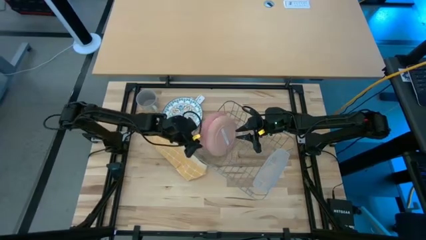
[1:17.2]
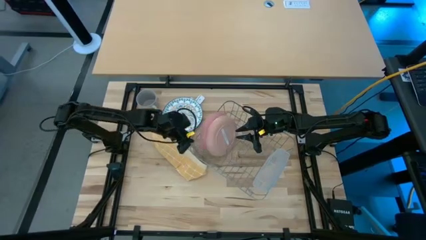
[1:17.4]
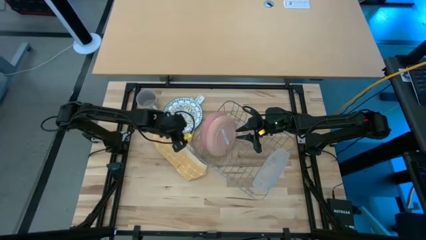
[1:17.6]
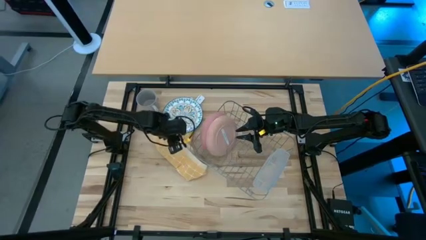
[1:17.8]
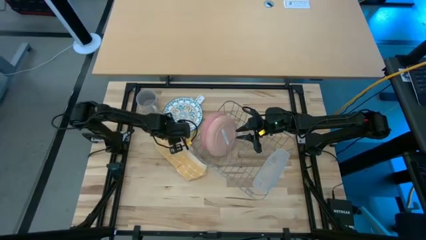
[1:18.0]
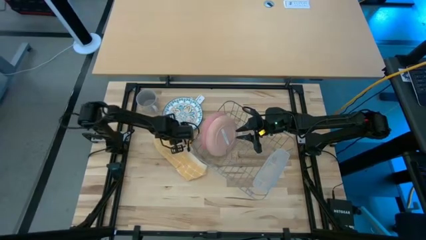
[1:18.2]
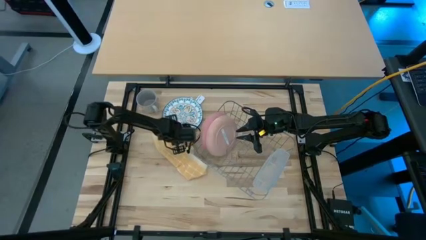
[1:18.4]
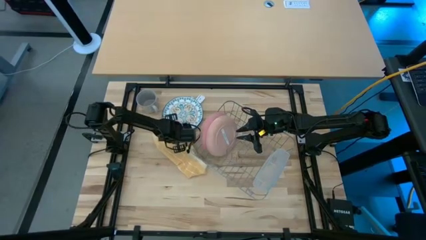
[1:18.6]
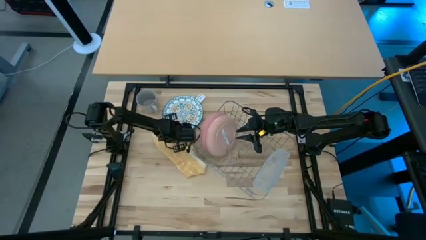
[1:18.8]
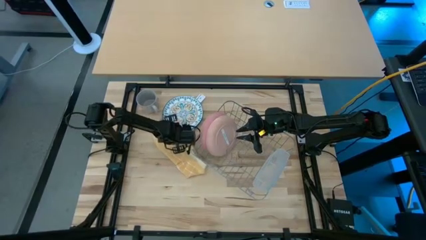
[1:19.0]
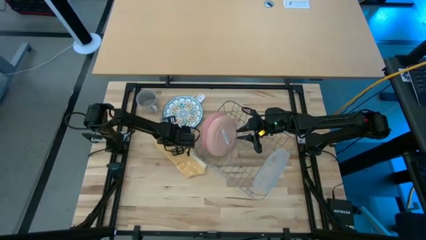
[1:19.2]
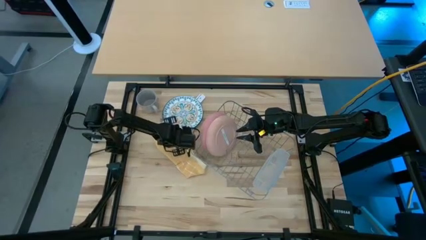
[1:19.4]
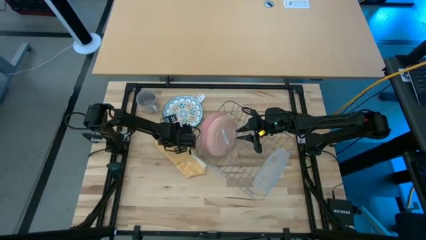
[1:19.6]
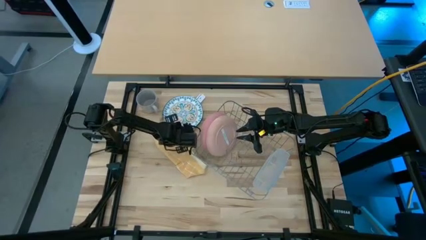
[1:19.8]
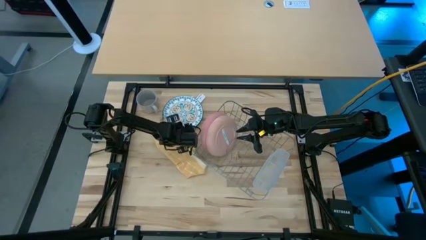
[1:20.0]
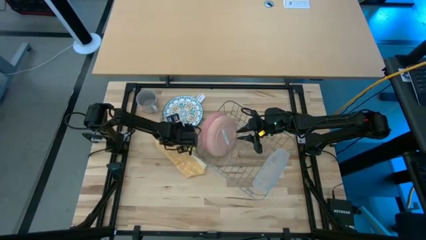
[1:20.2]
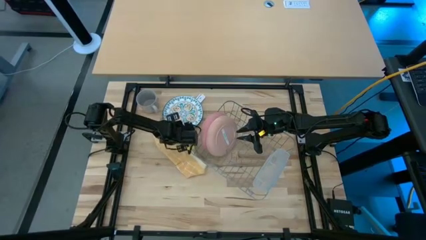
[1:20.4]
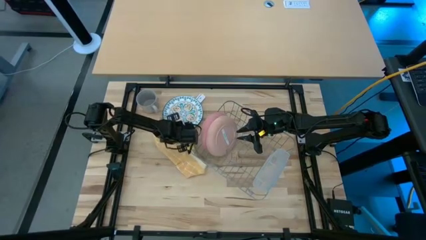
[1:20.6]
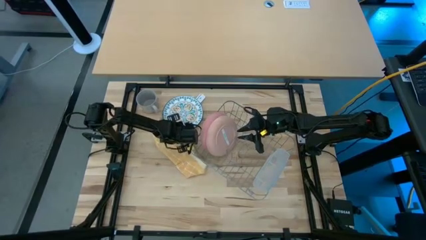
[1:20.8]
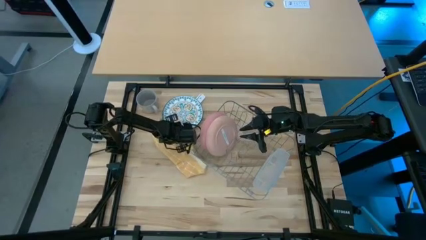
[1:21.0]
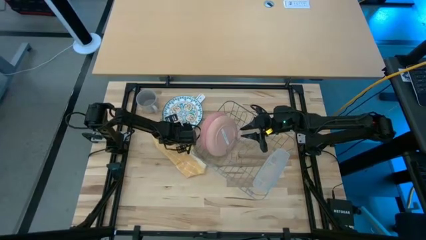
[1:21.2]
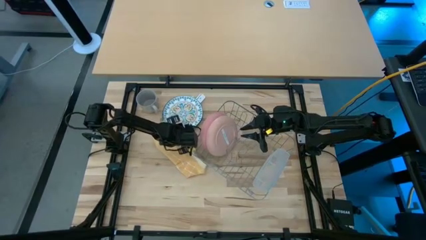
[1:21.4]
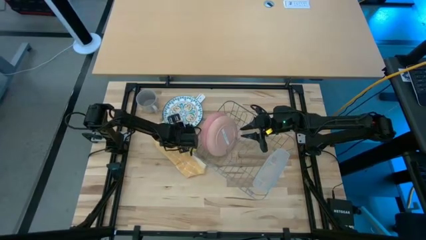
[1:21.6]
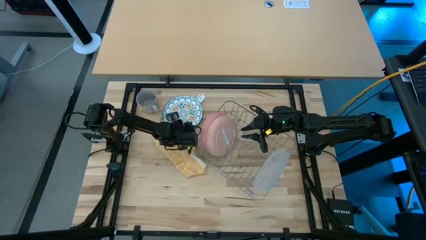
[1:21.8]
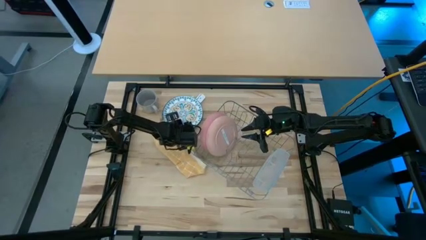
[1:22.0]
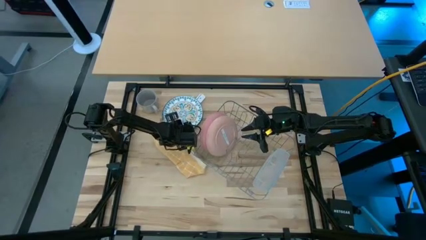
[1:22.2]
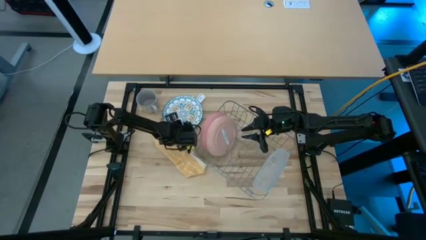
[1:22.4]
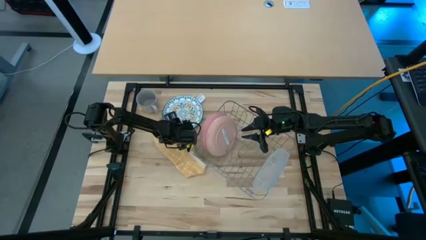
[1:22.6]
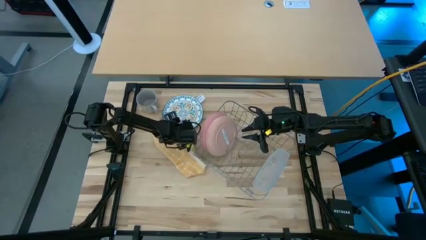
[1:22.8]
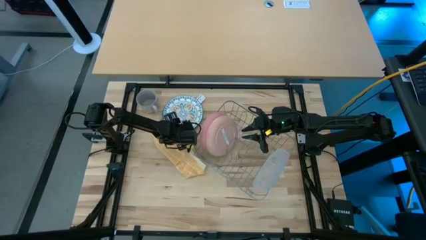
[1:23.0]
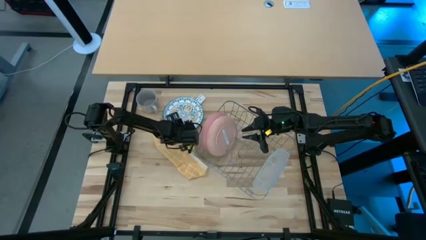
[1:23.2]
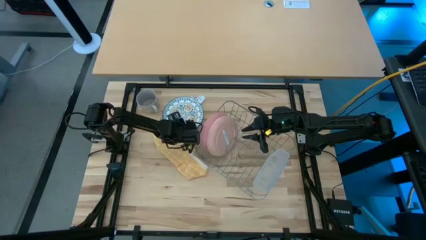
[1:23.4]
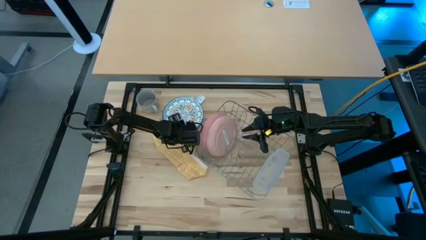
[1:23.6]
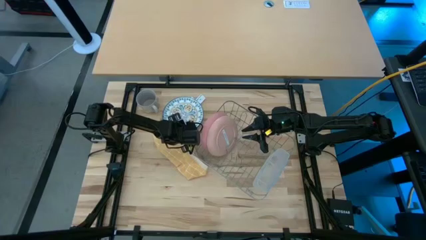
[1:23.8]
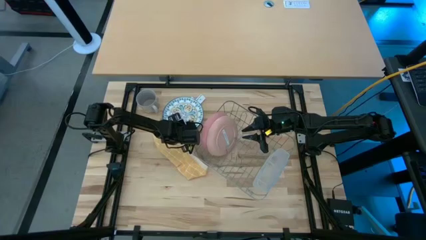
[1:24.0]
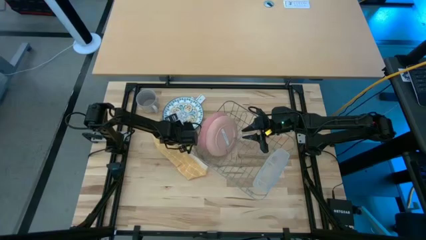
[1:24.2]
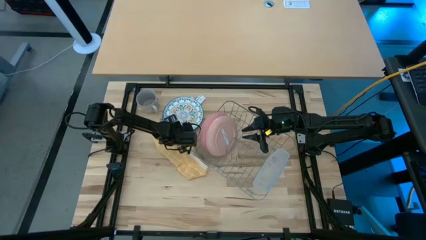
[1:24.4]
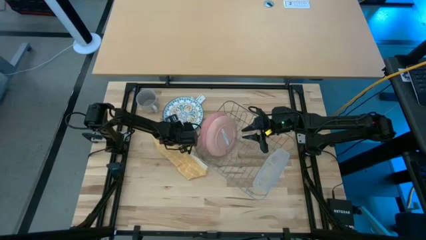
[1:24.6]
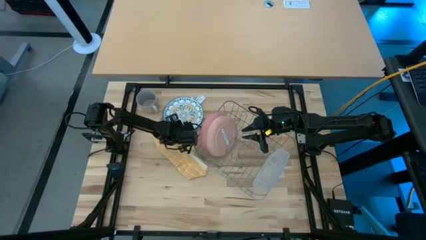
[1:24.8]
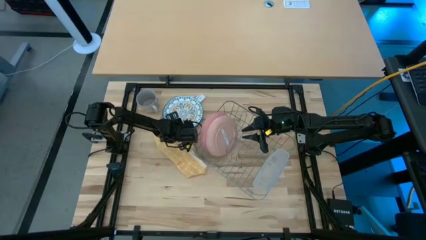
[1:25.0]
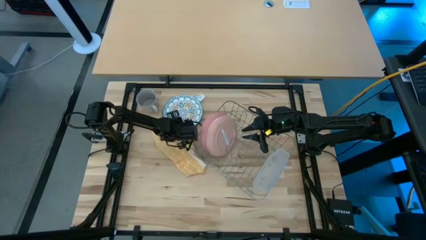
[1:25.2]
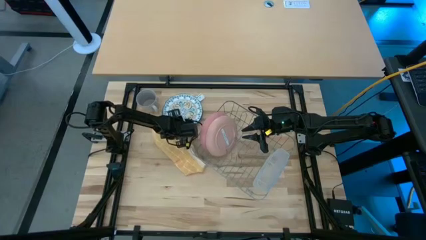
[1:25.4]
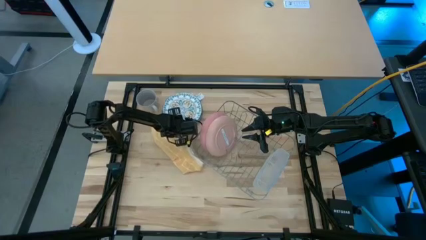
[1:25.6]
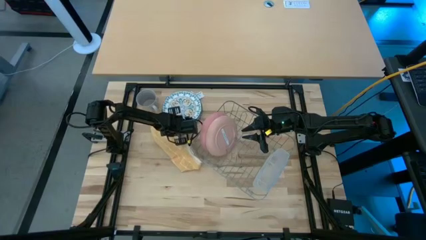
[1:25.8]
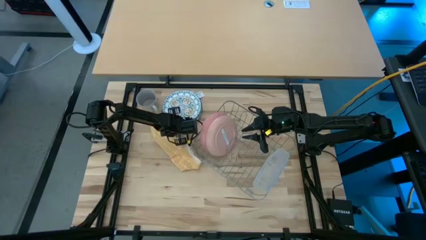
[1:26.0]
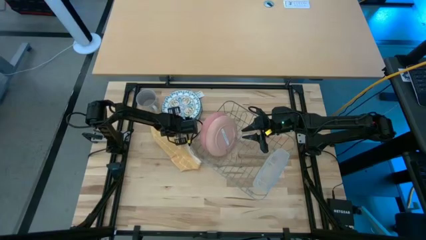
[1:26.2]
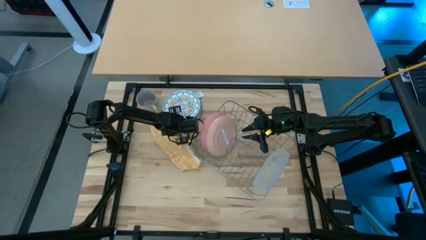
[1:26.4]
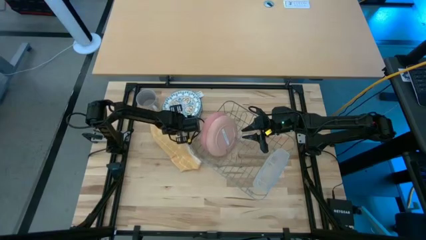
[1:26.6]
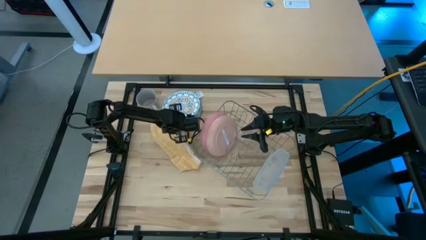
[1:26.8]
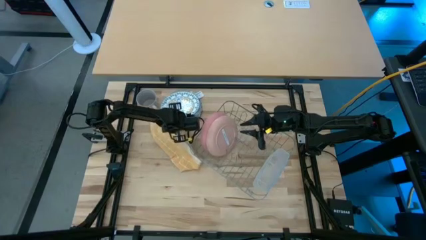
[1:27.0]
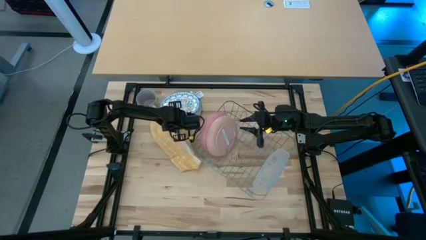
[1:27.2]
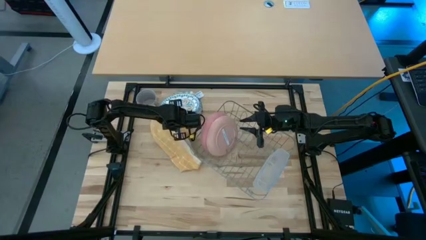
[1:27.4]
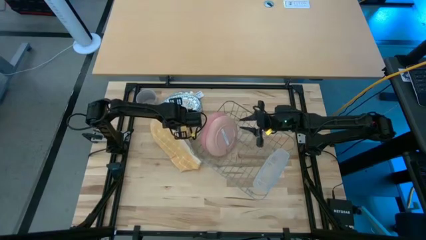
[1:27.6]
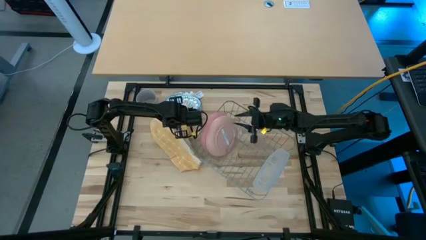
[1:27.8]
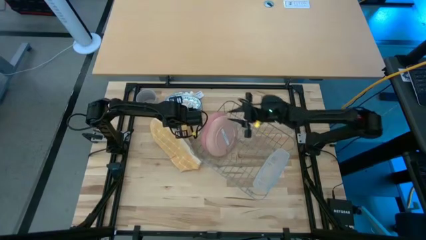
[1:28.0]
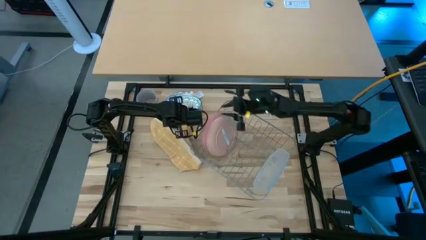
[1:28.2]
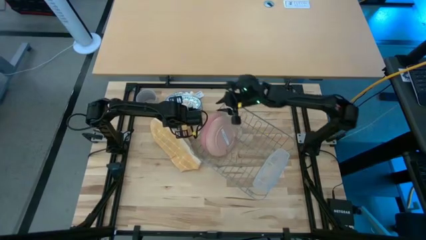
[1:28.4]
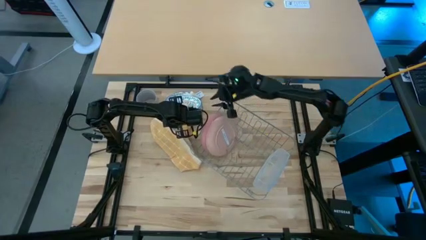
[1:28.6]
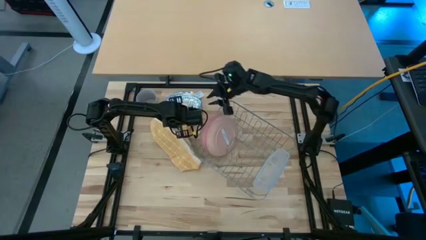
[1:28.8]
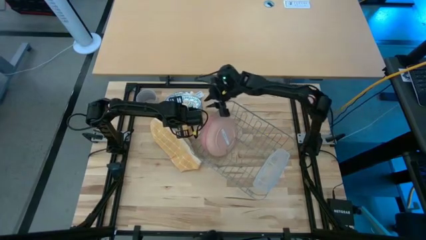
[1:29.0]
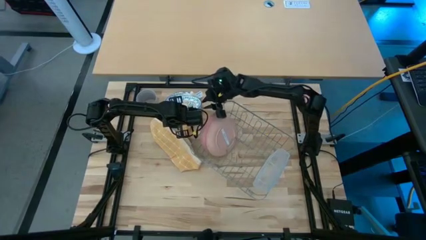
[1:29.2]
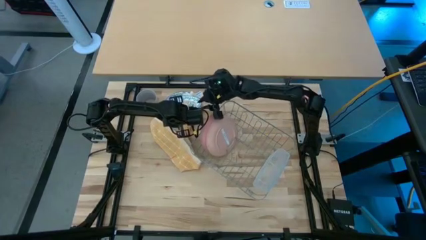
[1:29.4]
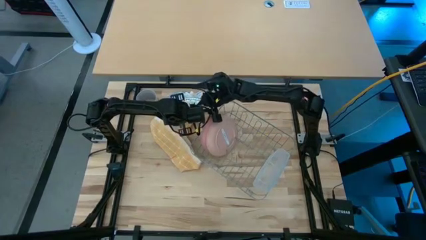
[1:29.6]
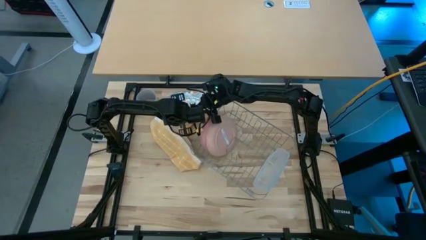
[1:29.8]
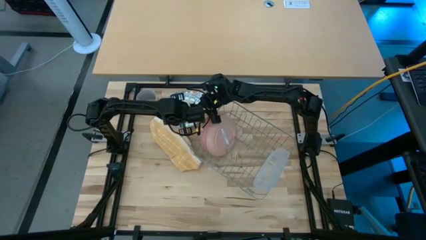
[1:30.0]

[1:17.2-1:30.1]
Task: Sort dishes
Put the orange patterned white plate into the dish rack

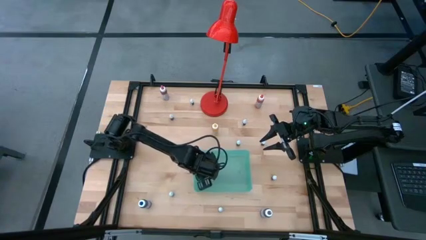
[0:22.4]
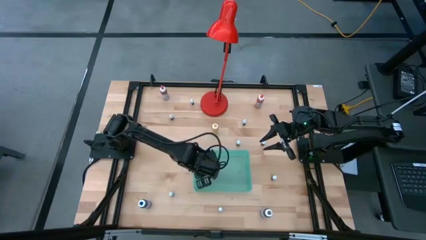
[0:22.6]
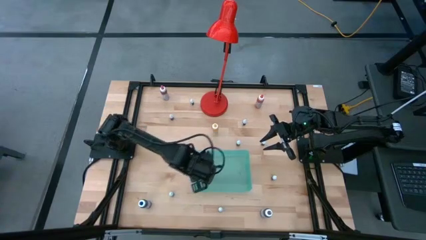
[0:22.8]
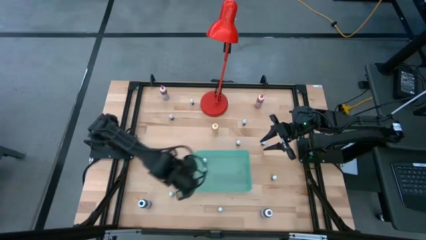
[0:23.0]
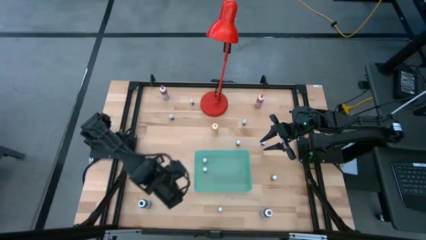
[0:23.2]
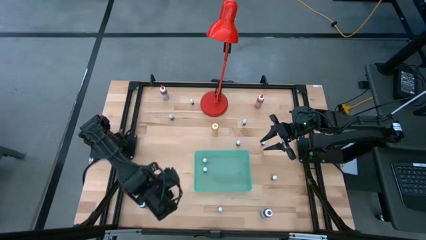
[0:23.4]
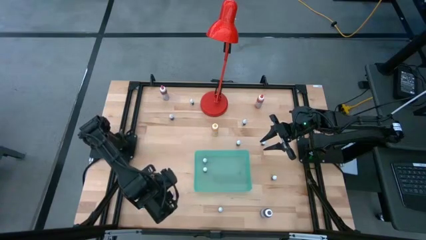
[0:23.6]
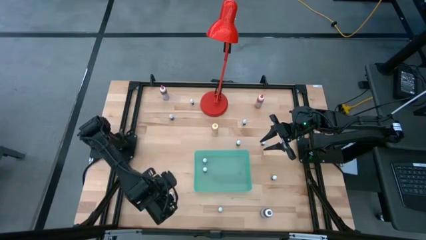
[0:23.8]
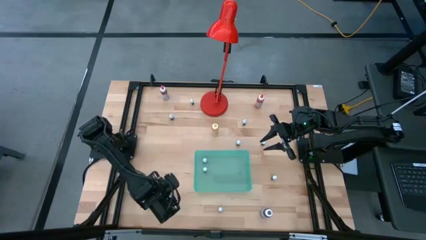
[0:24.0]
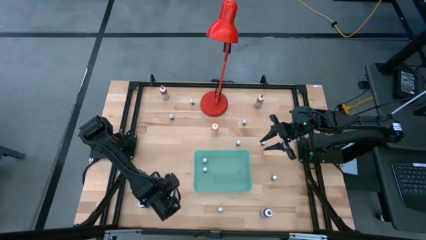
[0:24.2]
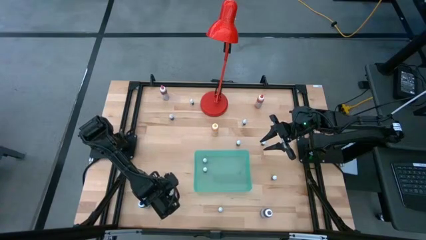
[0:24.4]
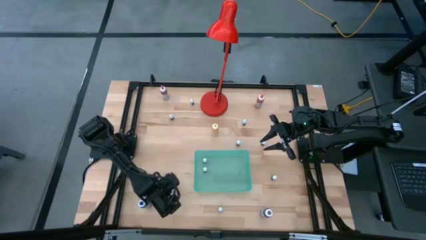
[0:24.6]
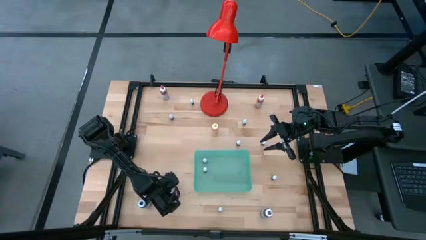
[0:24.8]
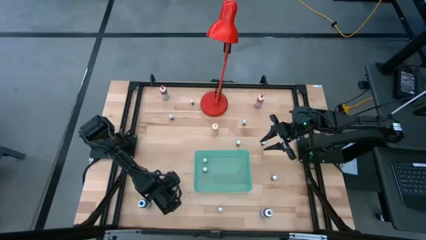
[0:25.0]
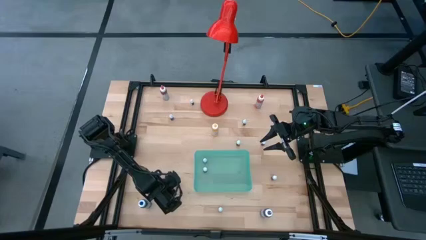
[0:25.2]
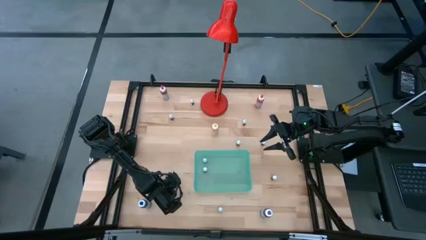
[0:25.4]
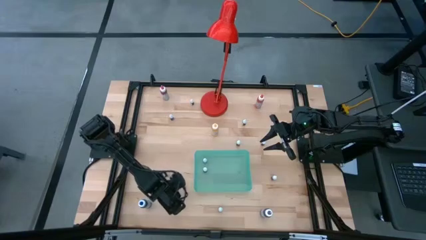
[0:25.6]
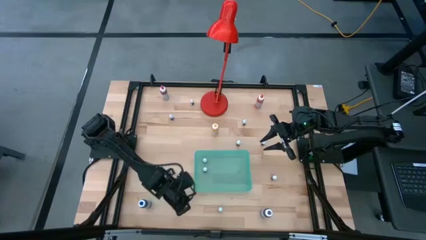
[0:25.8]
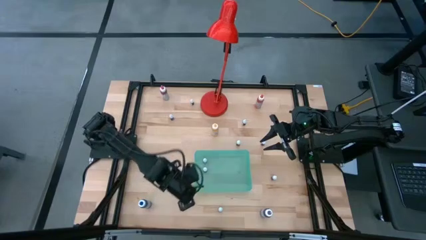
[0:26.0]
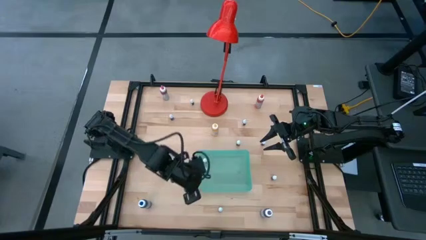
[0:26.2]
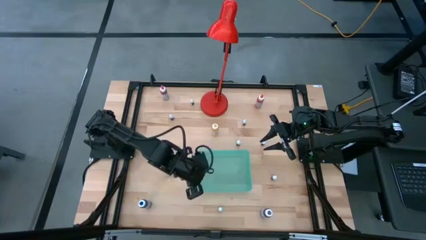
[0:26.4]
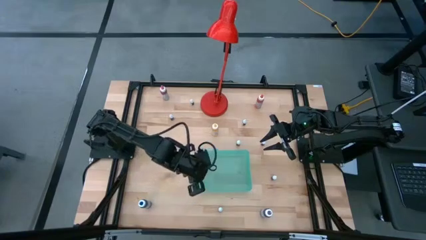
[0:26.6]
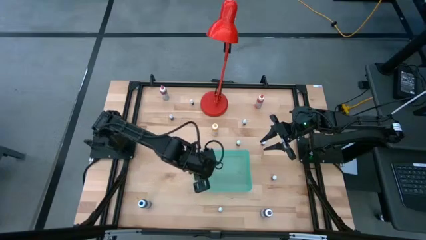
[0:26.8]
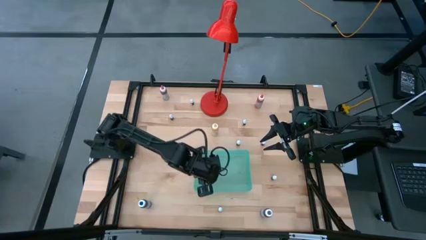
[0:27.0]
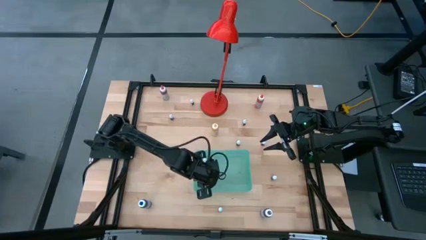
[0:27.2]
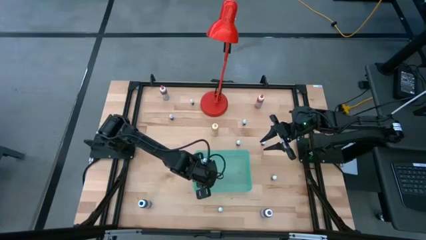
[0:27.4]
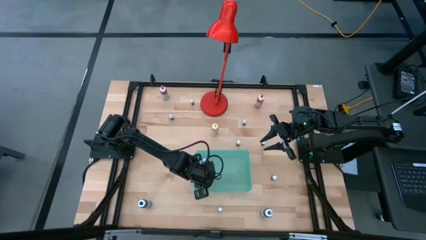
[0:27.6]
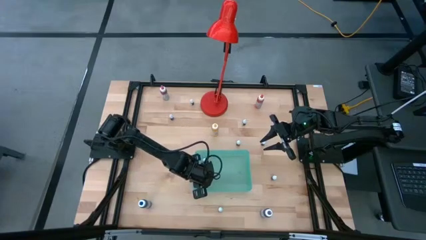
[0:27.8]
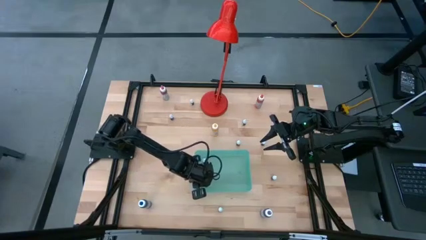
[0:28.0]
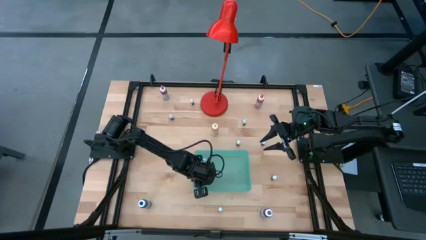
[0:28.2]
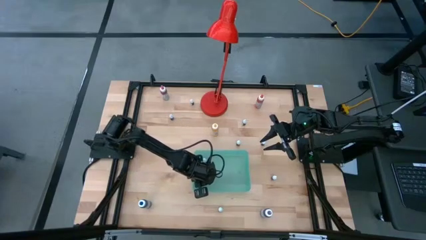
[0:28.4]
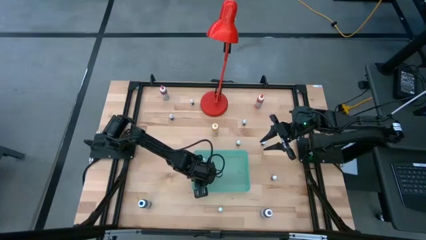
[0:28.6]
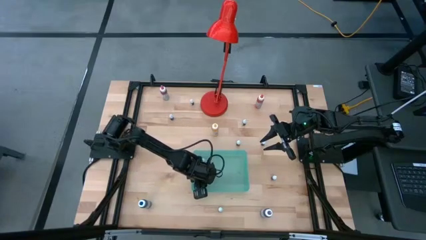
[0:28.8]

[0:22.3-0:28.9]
Task: Pick & Place food coloring
Put the small blue food coloring bottle into the blue bin
